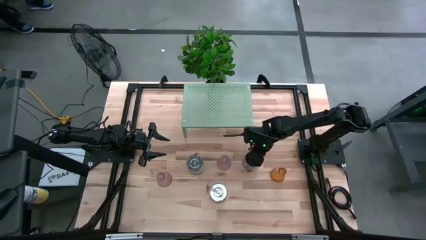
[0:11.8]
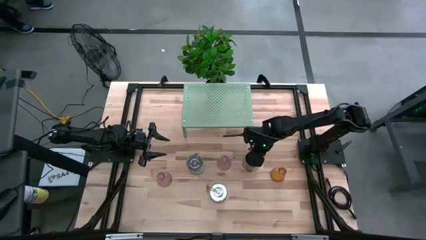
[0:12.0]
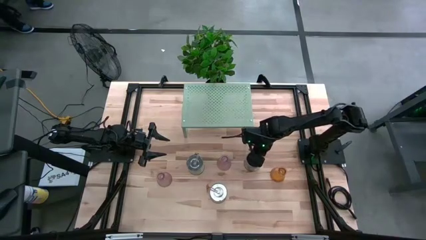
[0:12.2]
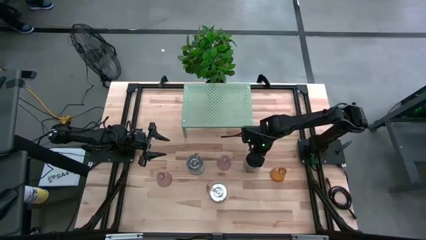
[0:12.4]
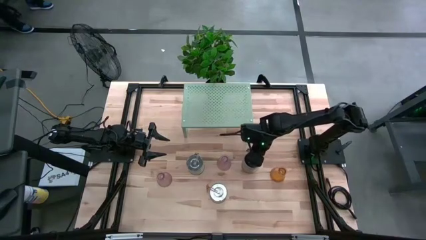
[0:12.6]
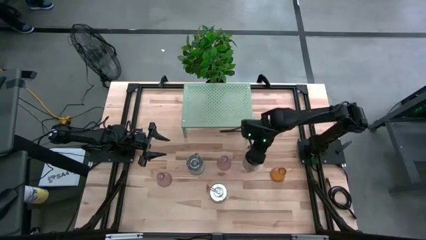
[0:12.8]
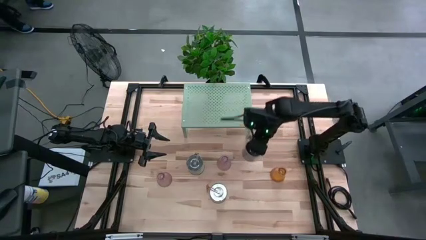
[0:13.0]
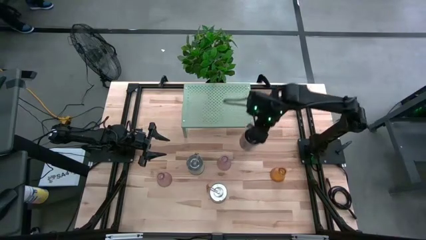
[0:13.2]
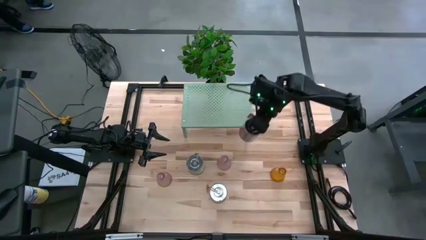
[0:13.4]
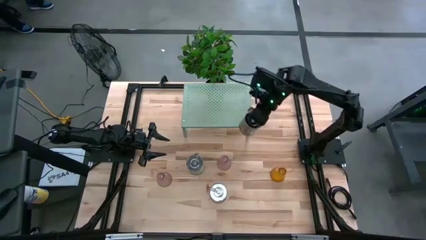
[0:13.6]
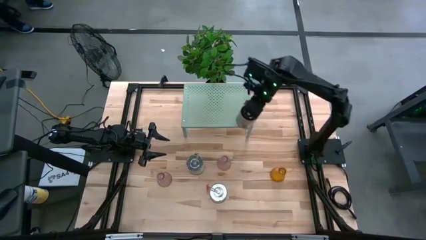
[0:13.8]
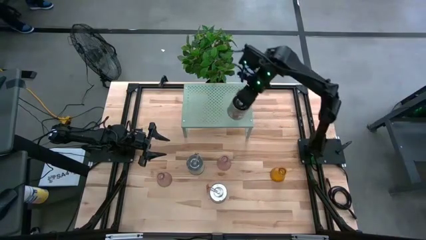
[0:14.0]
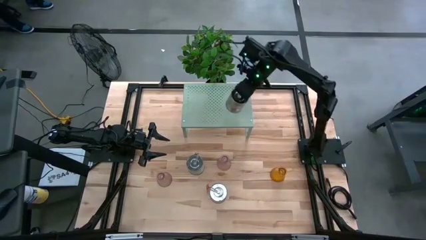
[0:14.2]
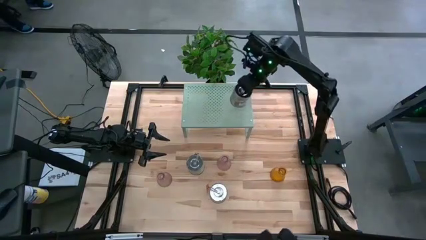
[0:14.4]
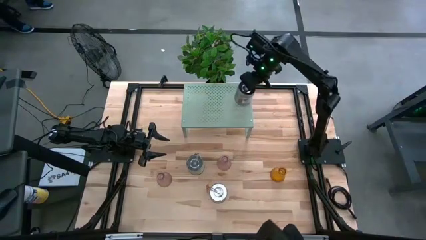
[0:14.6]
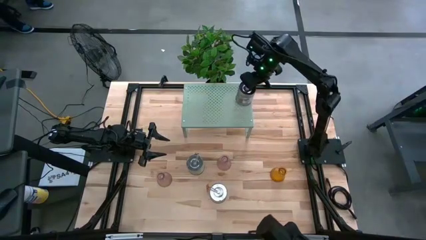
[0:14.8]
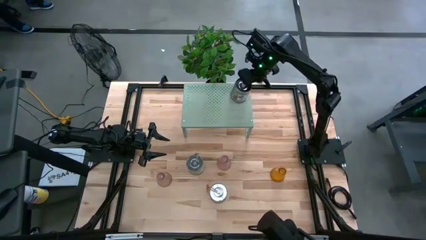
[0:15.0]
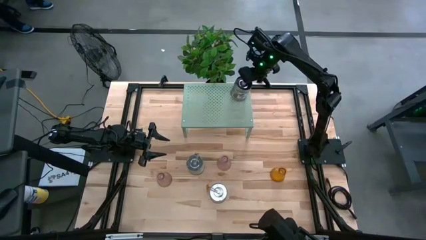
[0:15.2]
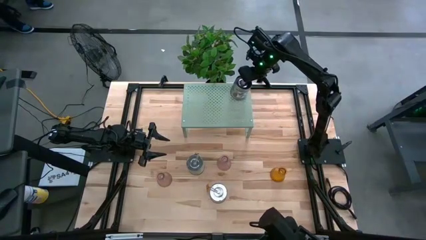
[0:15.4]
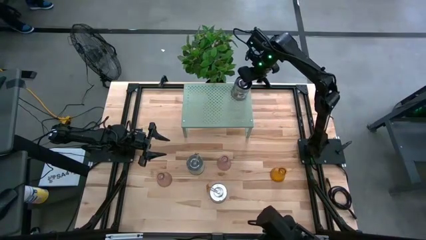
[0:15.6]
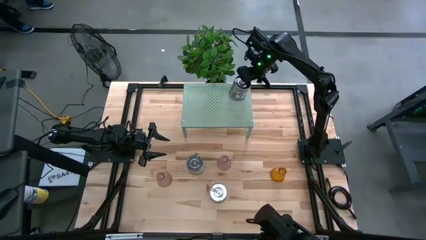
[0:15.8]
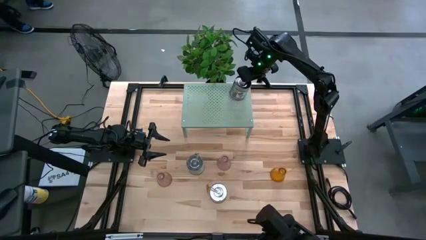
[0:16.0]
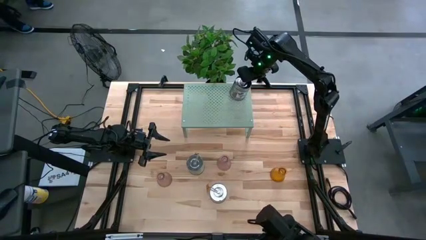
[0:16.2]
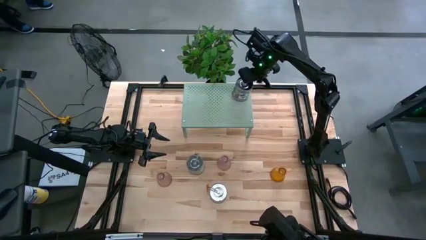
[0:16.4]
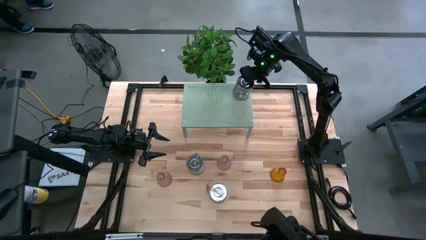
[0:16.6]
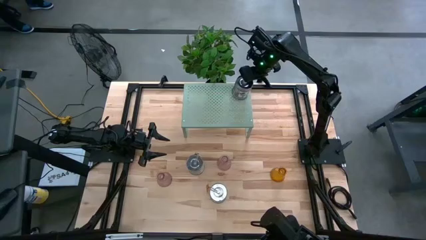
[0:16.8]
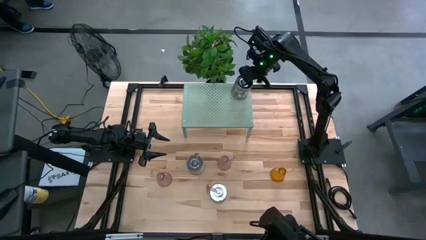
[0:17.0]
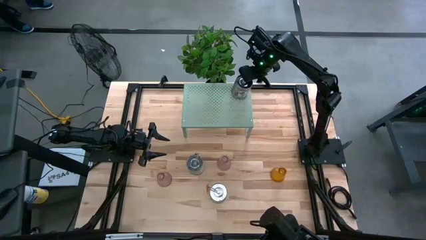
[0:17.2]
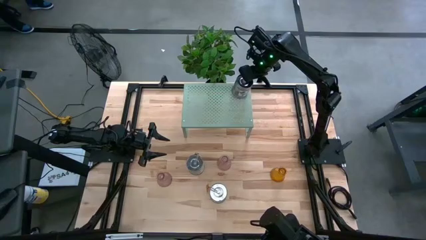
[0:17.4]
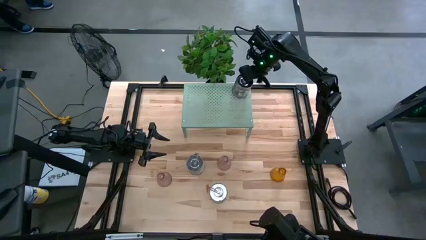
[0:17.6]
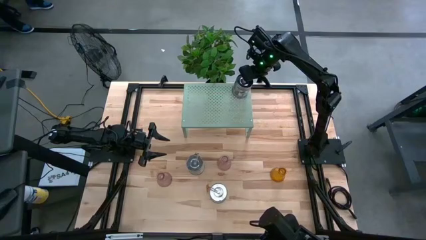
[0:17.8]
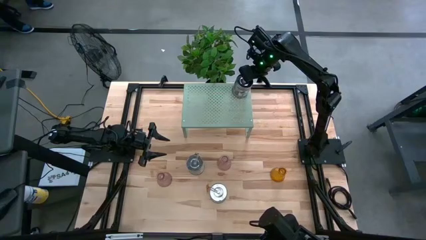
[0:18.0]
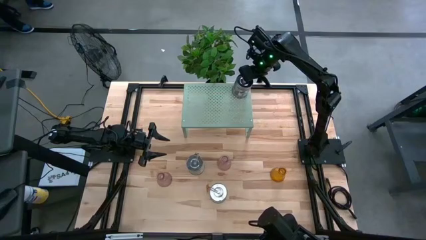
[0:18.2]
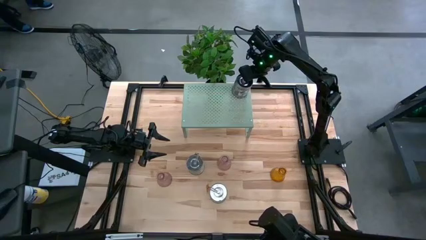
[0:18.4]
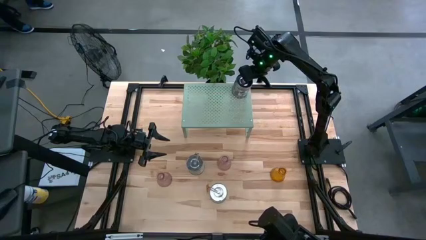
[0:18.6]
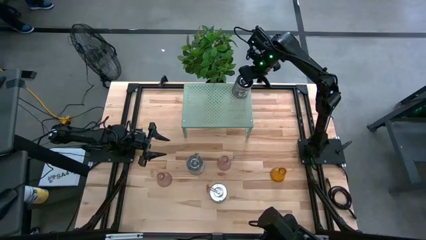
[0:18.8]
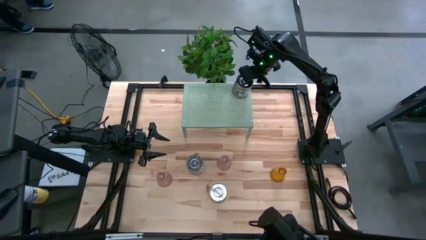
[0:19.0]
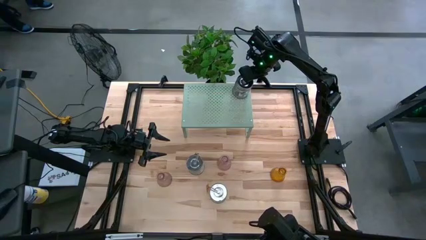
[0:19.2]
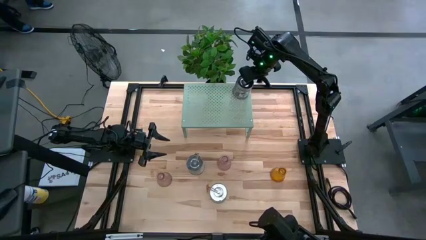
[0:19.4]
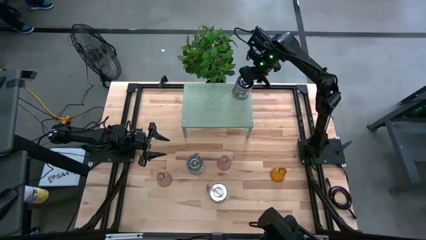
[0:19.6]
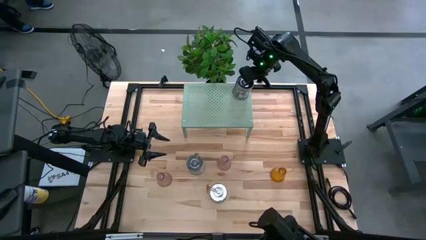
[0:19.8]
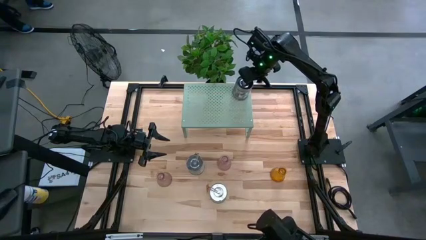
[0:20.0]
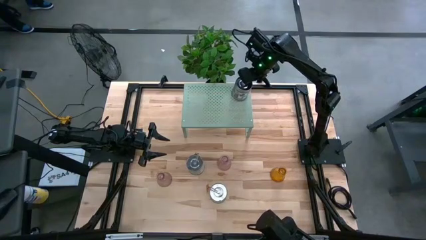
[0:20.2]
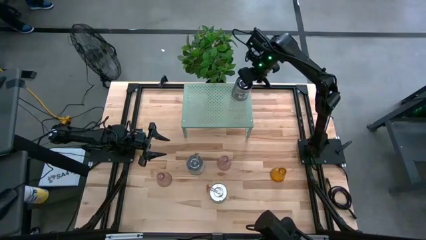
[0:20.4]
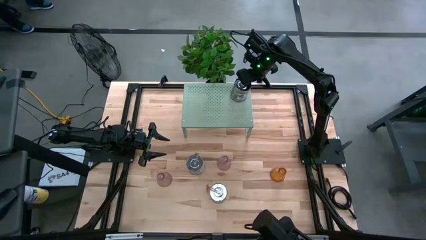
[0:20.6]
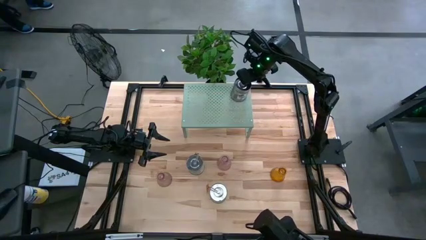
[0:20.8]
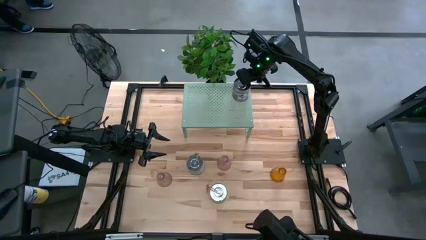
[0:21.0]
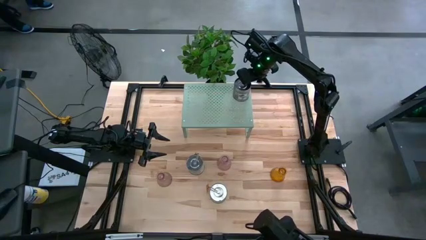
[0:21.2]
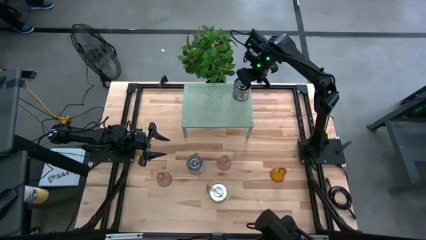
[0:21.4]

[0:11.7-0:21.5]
Task: Pick & Place candle stick holders
Put the top right scented candle on the shelf

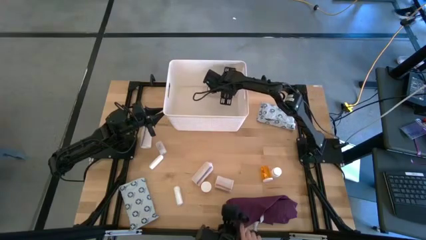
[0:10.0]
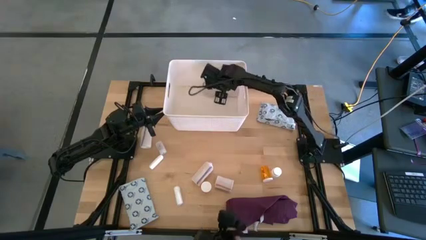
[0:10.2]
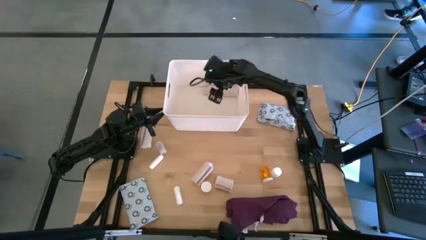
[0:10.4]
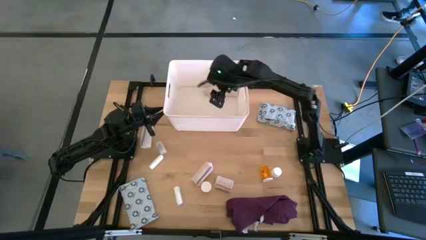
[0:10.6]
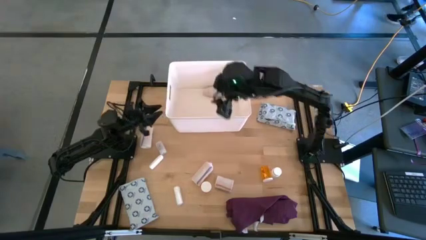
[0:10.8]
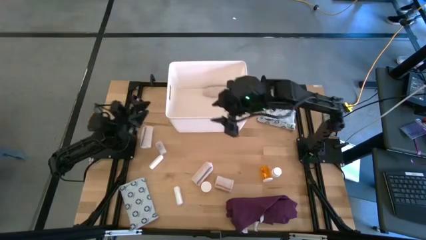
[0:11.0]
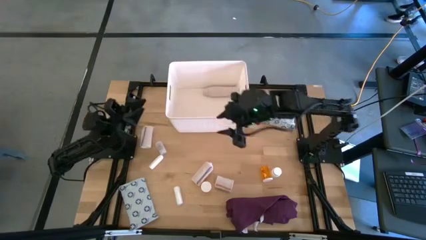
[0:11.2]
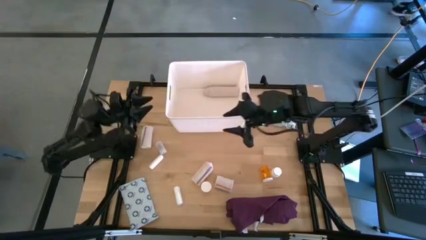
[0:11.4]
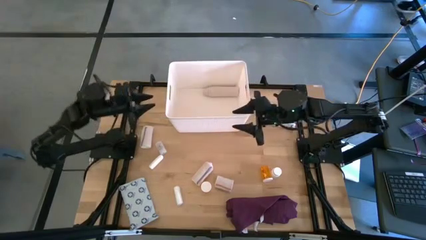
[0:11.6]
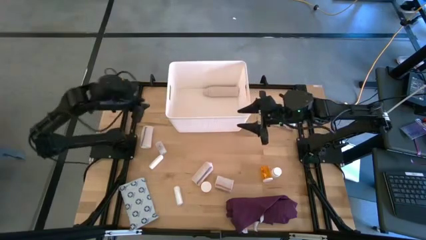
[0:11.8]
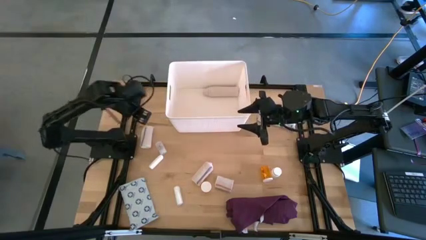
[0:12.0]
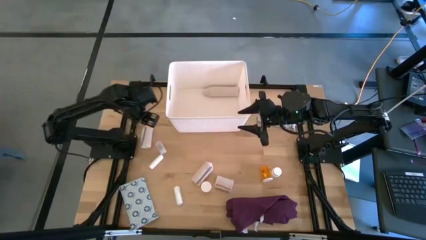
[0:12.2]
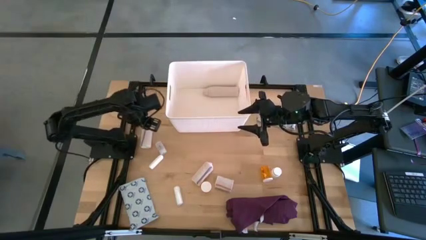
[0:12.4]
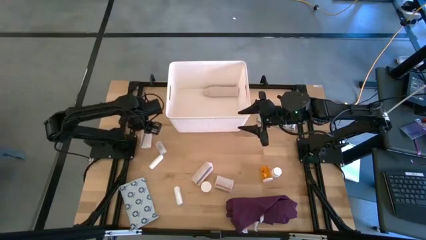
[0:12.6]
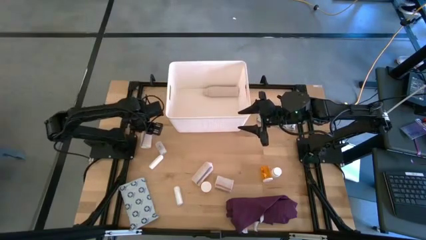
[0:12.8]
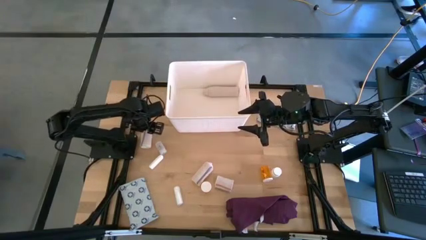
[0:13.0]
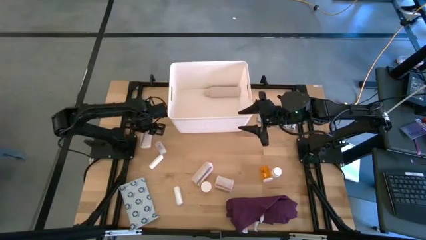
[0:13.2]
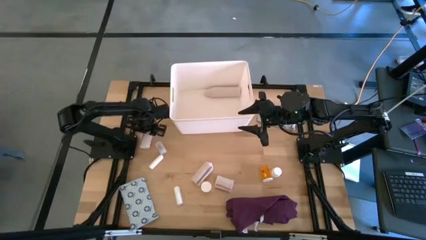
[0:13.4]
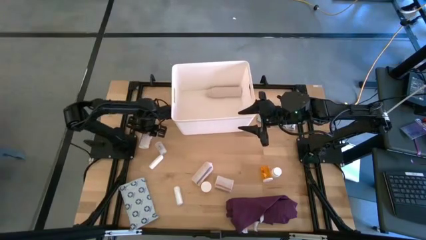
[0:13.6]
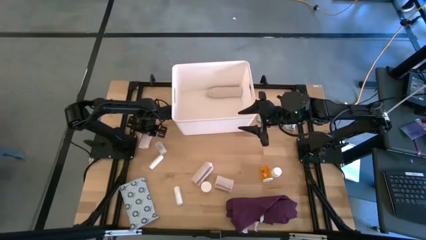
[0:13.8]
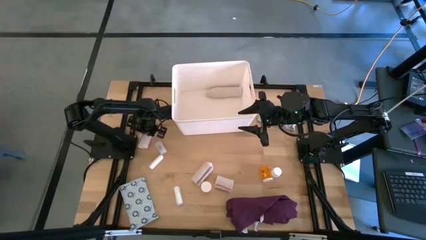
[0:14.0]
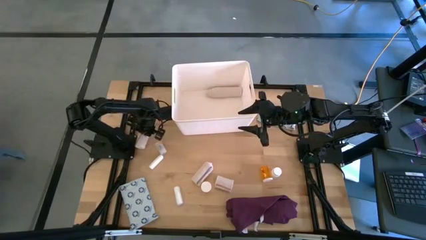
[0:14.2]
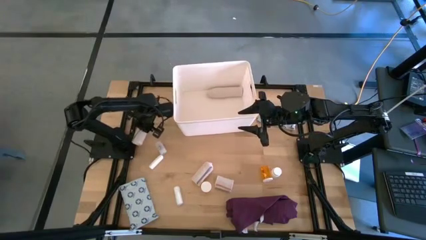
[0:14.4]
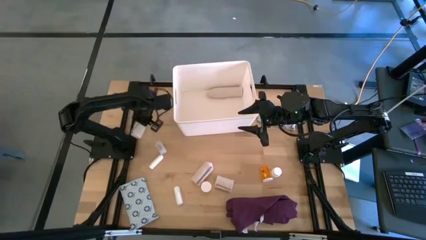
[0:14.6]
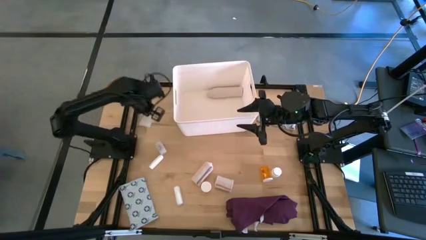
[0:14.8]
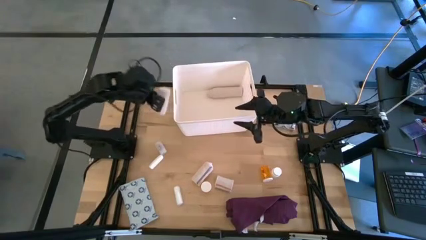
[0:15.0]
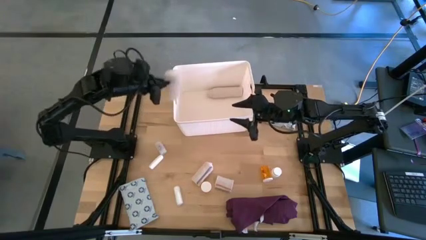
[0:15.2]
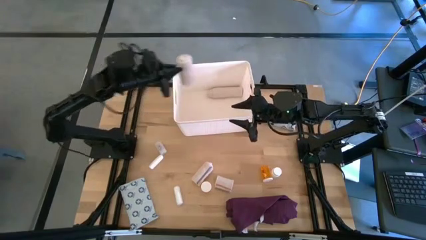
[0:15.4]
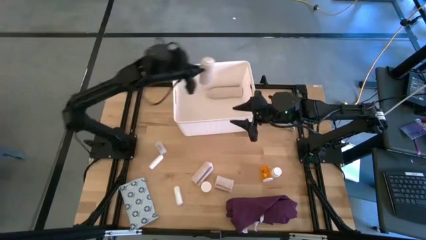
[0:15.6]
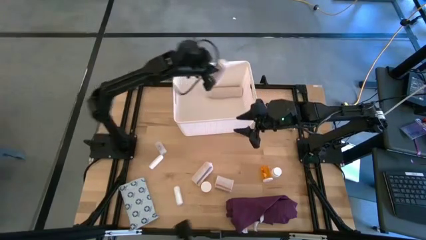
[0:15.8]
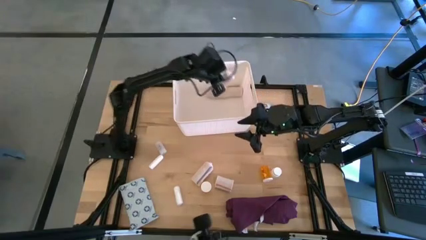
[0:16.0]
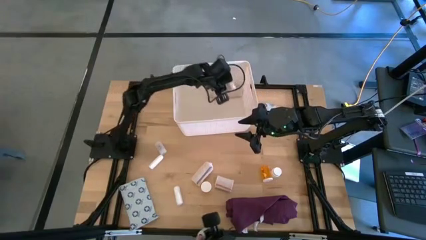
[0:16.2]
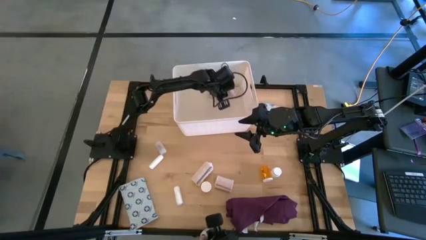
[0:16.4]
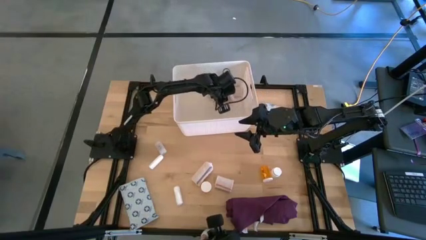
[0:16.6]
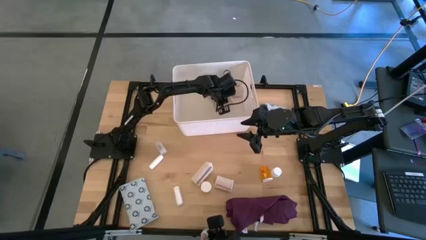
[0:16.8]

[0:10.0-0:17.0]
Task: Pick & place medical supplies in basket/bin
Put the left light brown and blue bandage into the white bin
